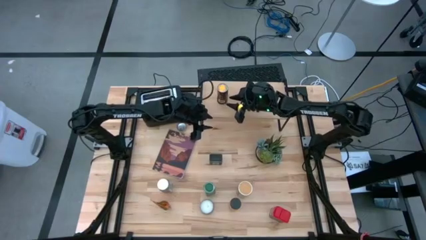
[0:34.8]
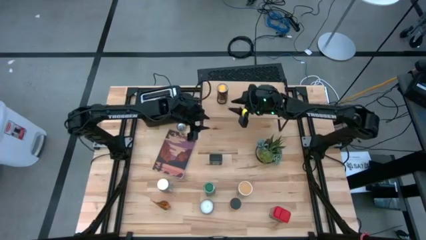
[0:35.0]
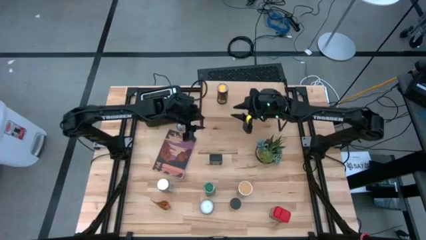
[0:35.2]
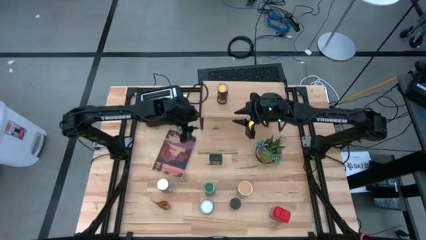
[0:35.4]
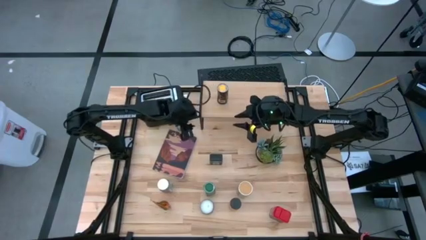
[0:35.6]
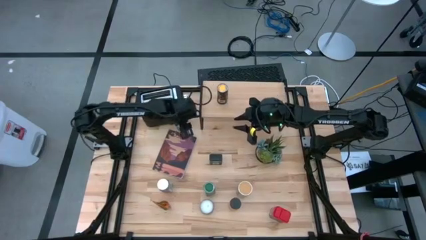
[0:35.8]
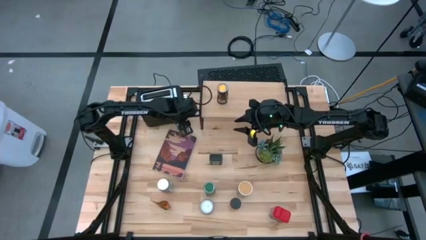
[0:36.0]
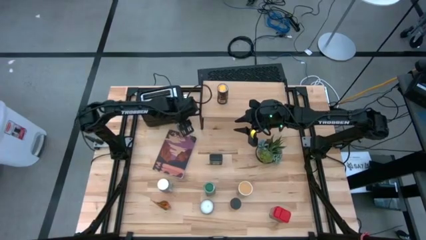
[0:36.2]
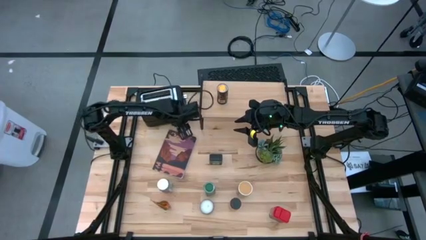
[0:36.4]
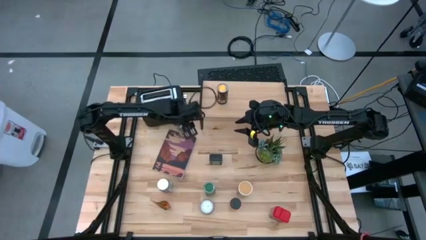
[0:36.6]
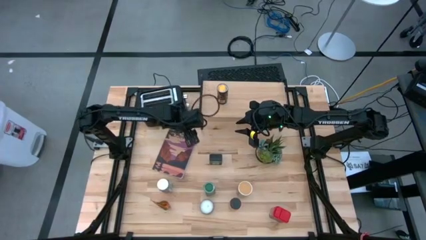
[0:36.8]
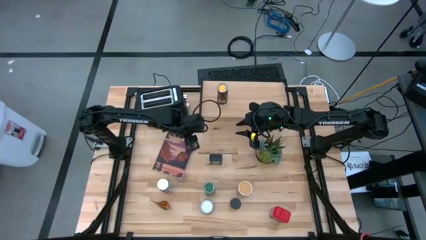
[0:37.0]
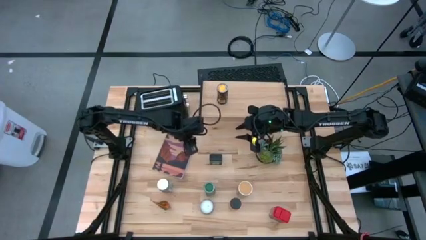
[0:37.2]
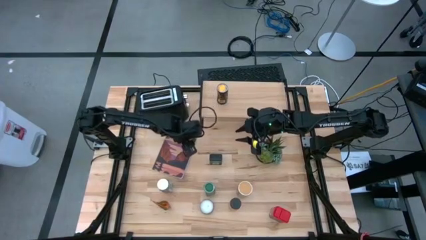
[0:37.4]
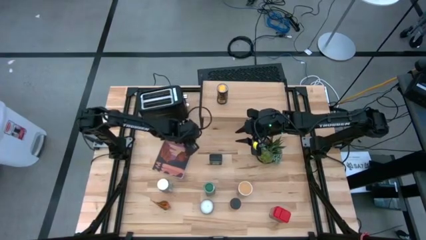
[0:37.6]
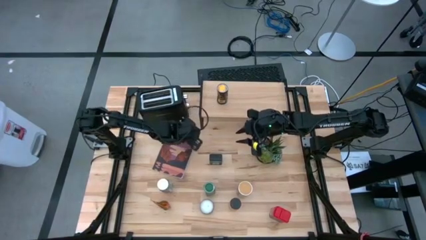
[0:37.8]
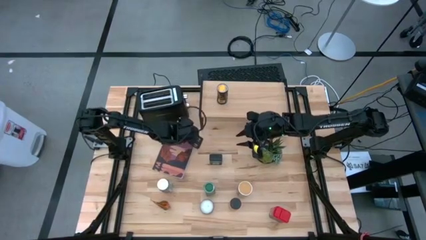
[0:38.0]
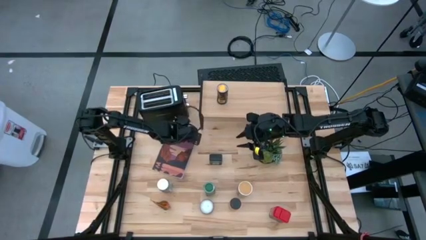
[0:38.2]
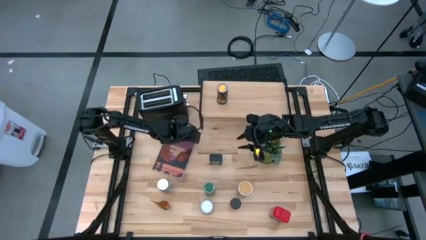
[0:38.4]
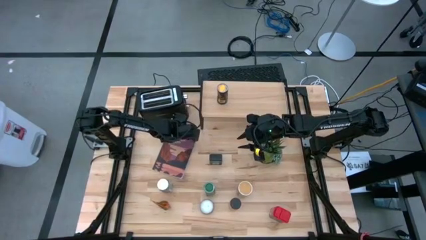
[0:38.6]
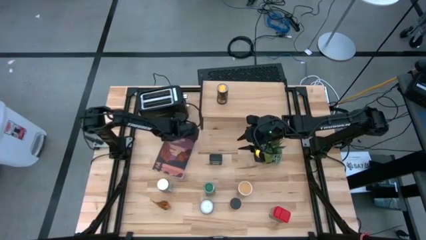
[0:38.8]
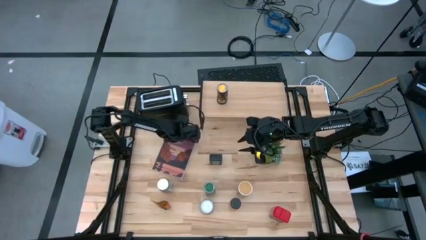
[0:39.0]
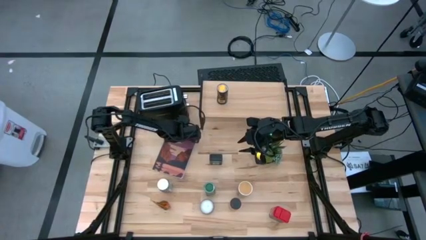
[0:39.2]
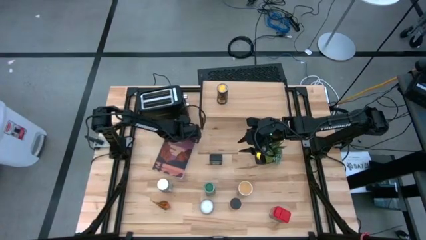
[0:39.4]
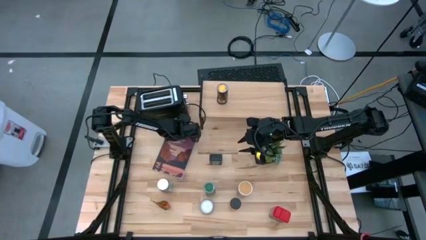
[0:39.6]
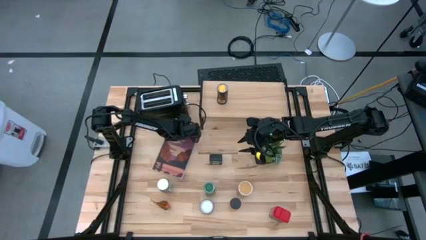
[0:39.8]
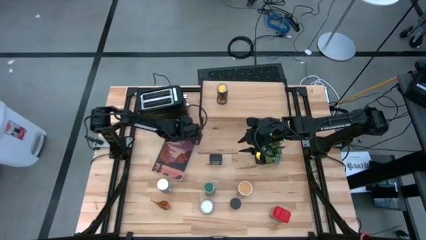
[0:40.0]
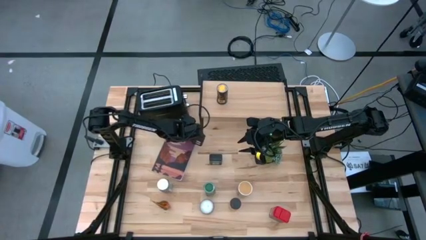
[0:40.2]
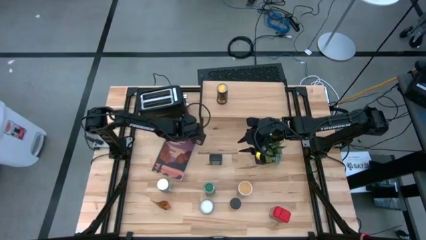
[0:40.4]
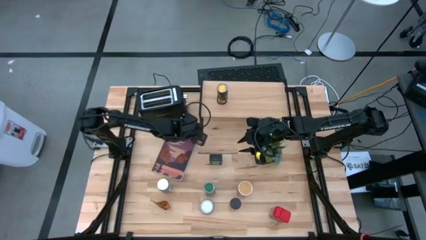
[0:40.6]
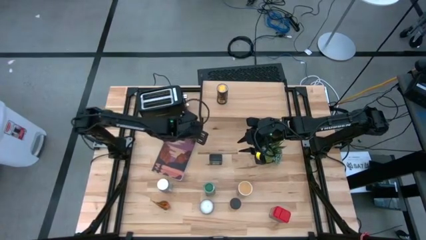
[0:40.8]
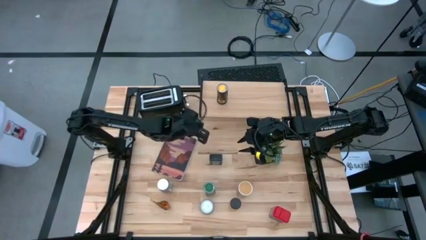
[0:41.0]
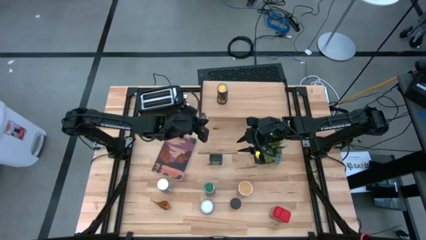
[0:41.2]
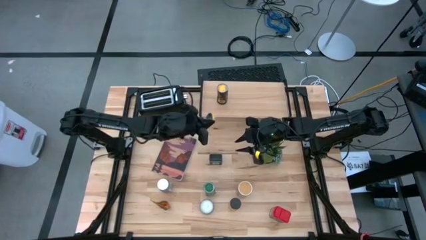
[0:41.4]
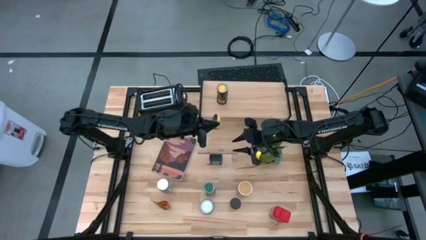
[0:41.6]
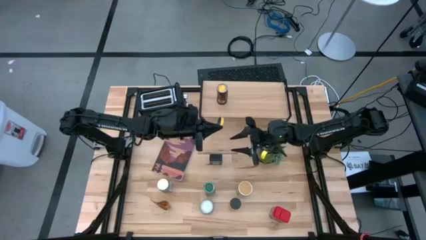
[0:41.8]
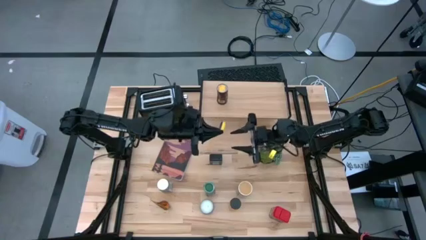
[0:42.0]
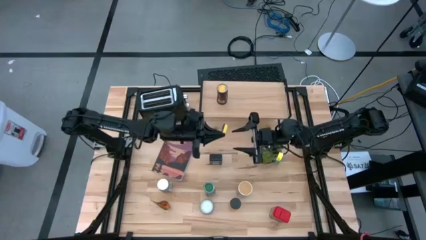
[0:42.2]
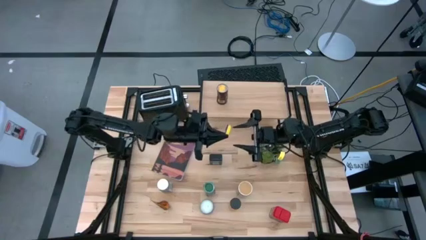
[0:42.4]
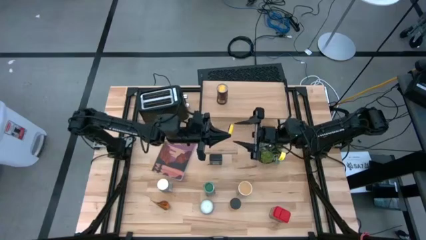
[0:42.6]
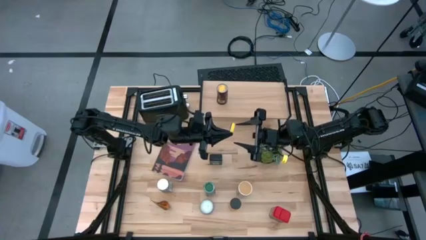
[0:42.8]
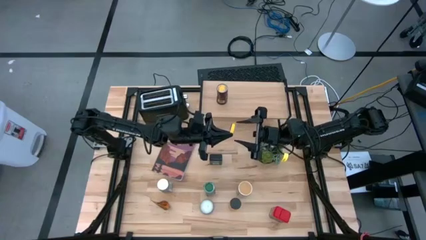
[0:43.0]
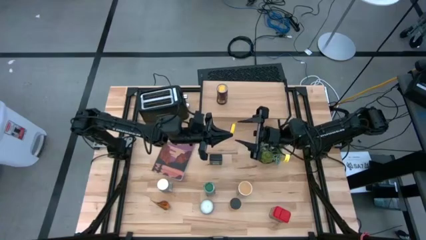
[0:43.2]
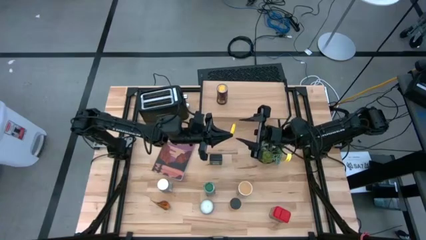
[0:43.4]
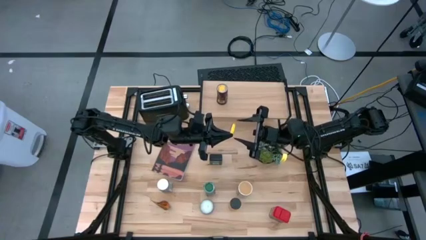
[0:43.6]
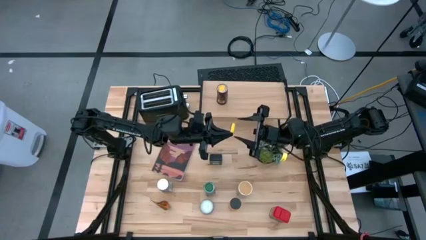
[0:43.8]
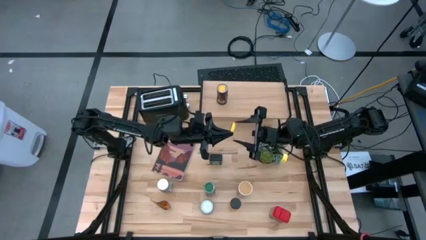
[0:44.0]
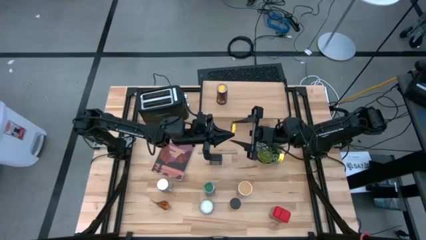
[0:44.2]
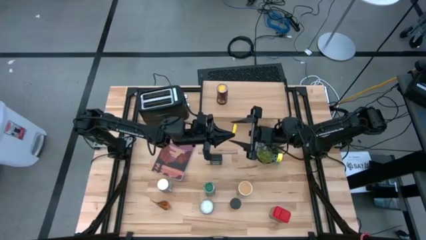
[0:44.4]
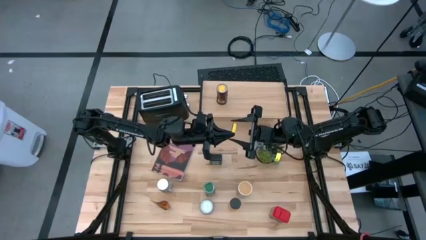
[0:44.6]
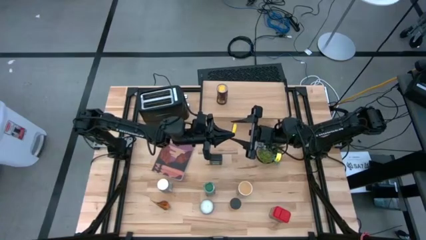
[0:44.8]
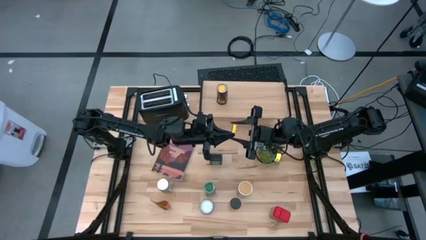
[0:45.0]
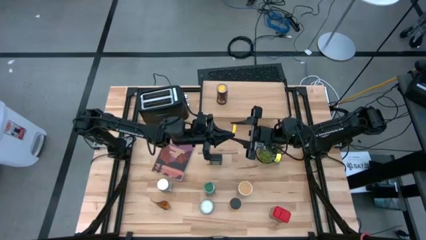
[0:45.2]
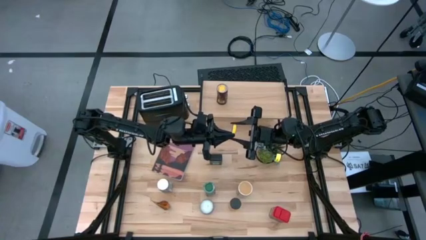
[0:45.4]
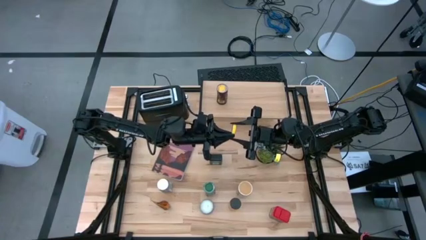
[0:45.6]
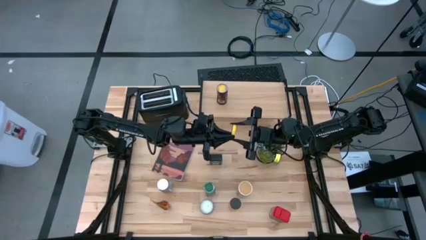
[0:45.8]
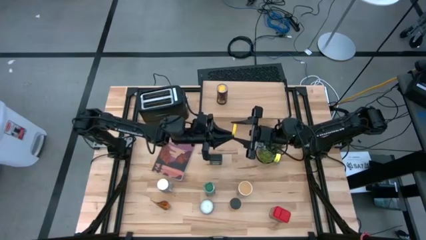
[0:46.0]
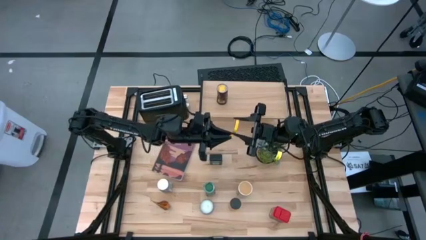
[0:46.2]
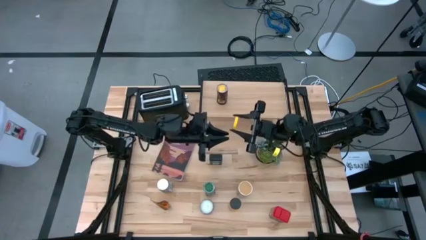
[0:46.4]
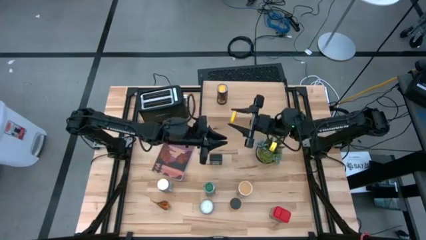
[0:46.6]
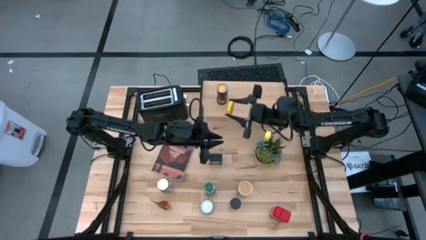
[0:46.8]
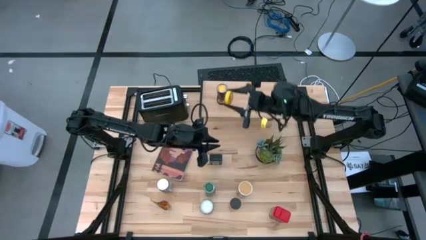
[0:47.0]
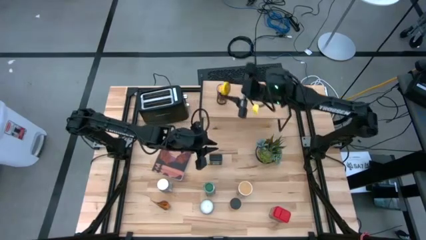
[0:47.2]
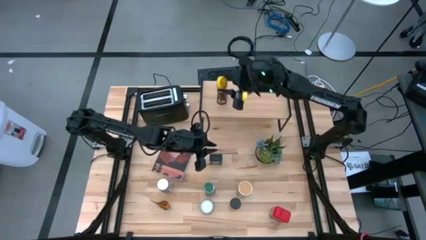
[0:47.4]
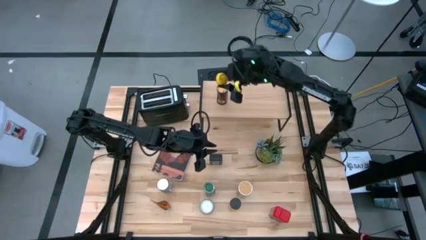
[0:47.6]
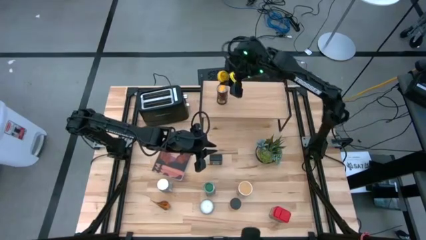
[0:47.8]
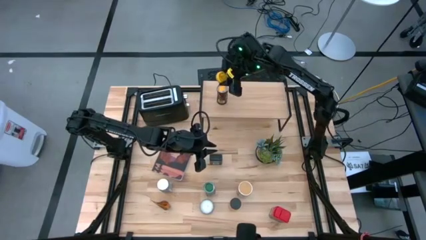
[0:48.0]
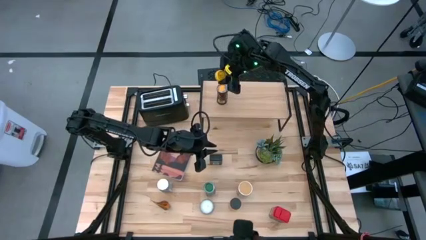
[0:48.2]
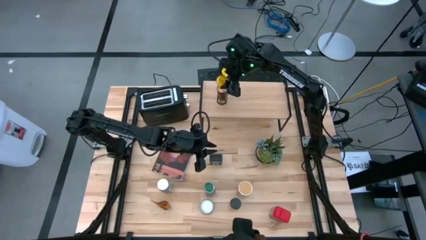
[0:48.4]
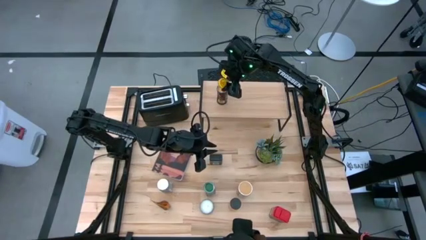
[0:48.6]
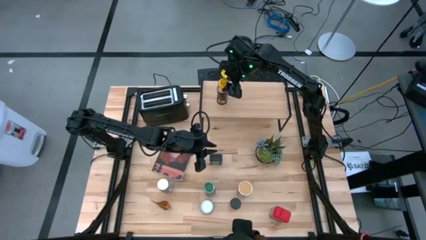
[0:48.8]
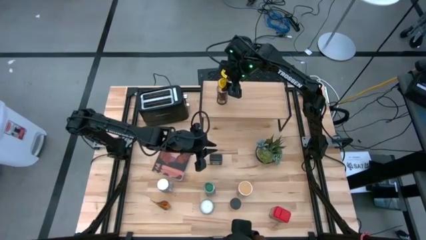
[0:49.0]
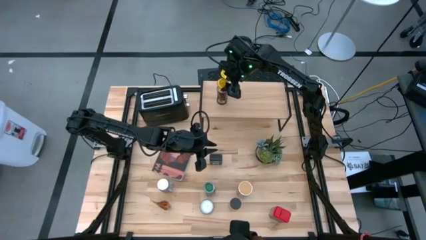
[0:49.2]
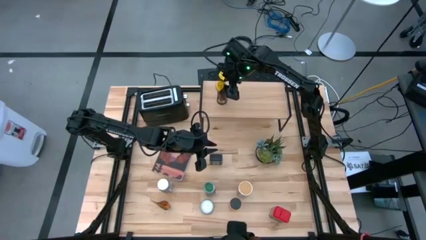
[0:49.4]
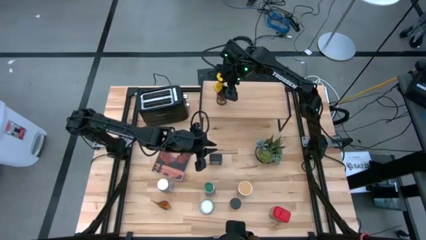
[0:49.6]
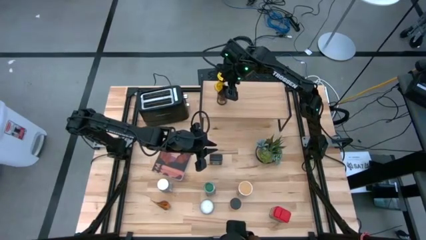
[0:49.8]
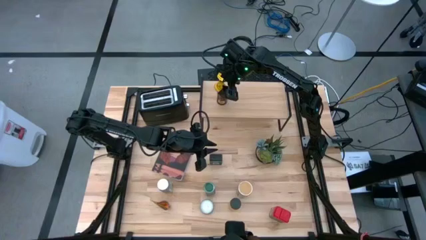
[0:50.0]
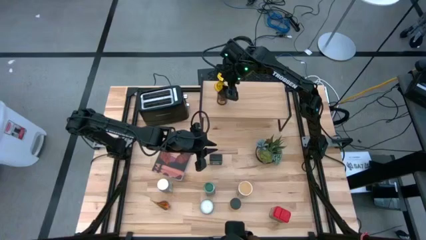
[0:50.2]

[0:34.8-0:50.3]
Task: Shelf spices
Put the yellow cap into the seasoning bottle

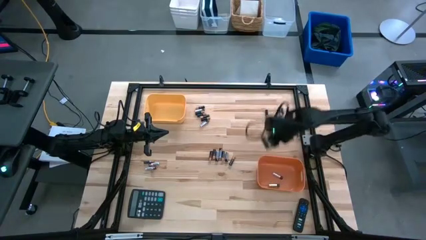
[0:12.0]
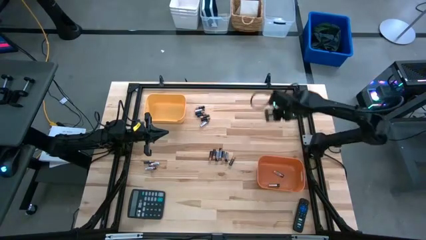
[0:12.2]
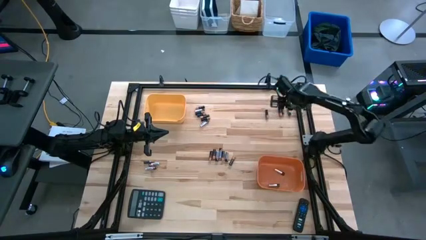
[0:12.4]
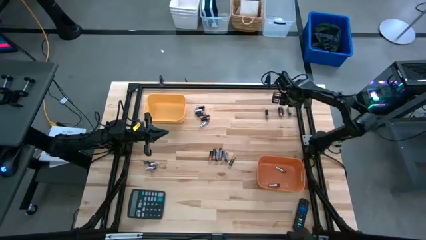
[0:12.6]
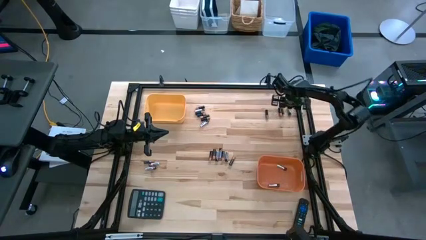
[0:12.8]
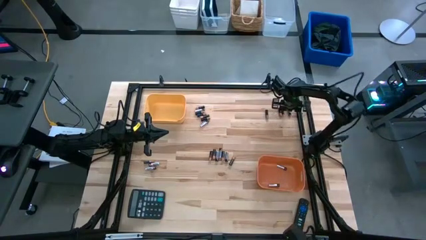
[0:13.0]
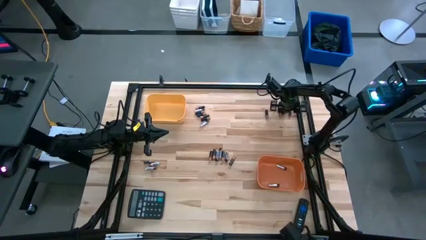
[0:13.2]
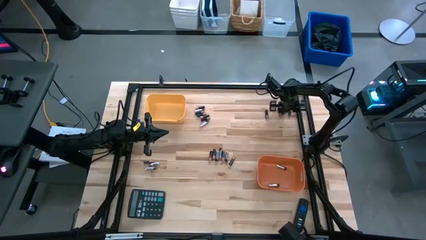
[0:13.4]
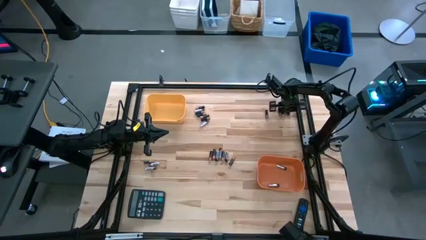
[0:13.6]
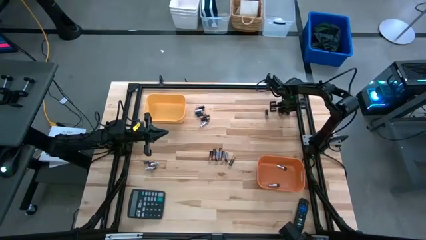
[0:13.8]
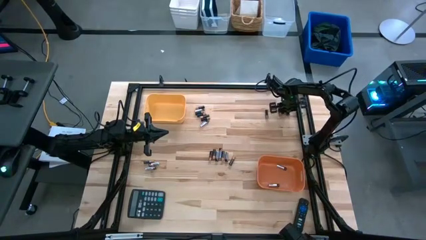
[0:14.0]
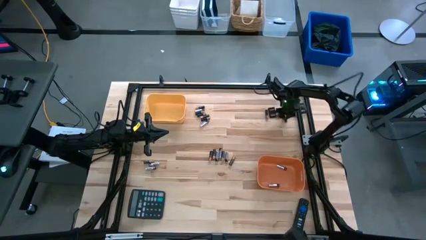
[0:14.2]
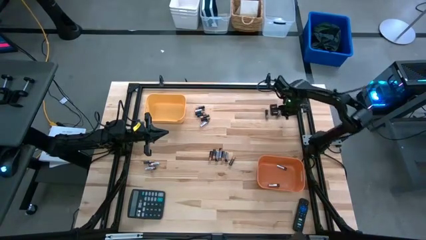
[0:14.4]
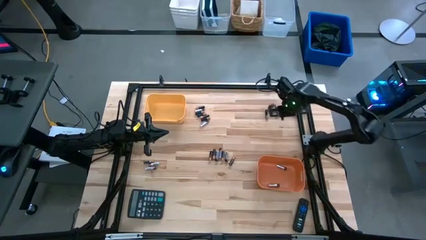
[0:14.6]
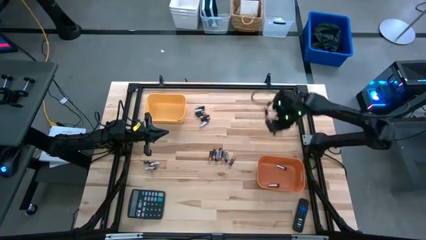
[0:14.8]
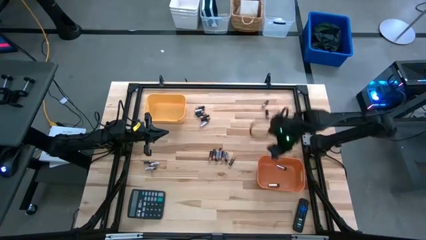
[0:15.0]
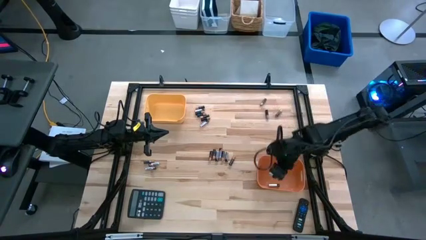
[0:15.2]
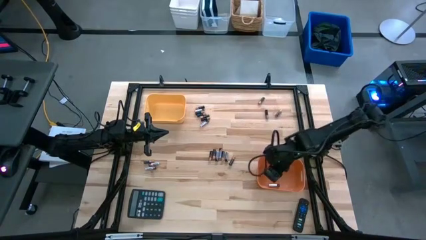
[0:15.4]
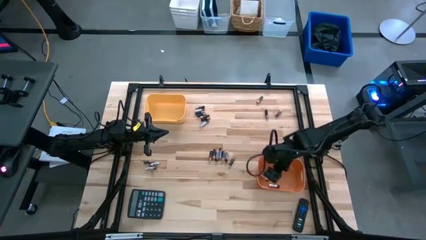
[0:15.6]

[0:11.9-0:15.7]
Task: Sort batteries
Put the silver battery into the orange bin
